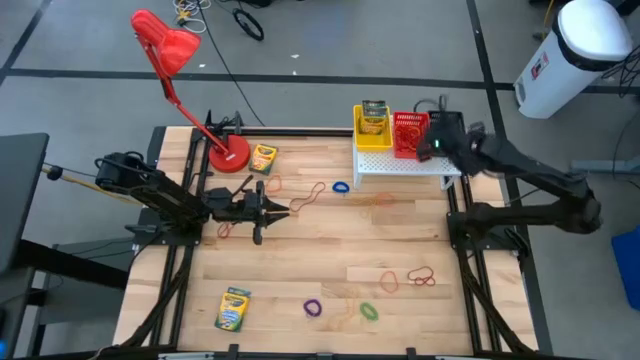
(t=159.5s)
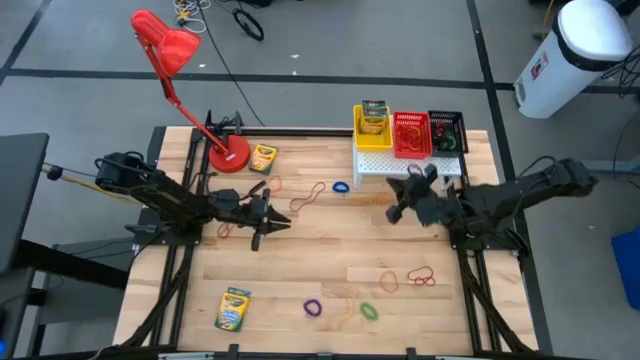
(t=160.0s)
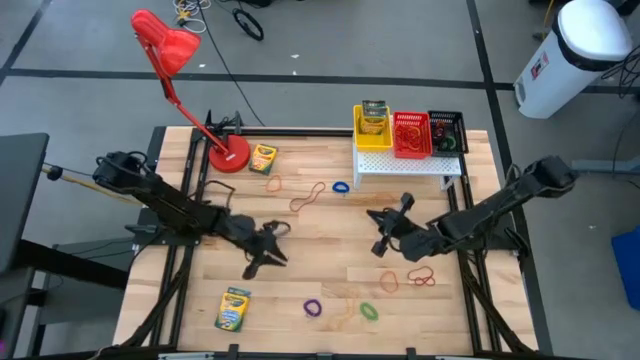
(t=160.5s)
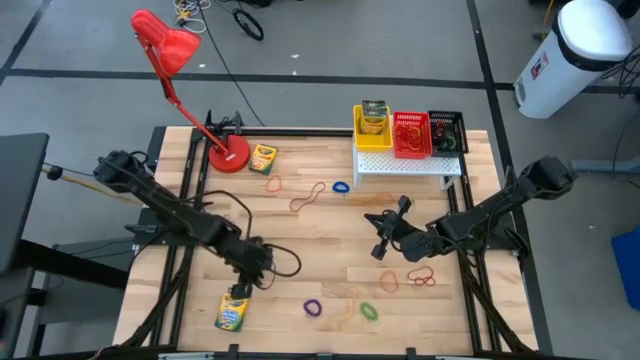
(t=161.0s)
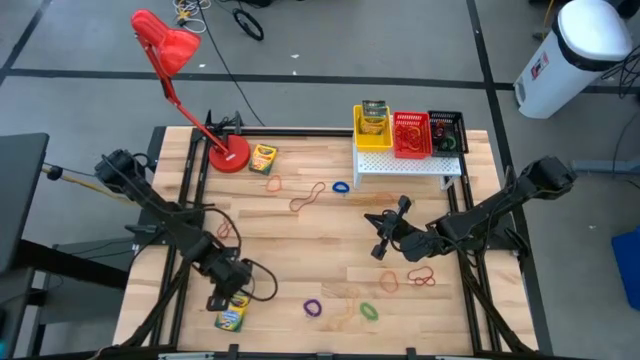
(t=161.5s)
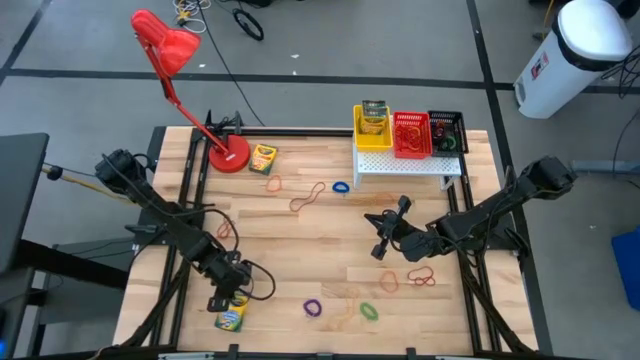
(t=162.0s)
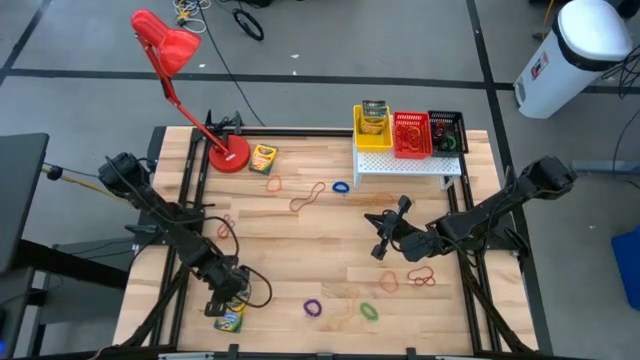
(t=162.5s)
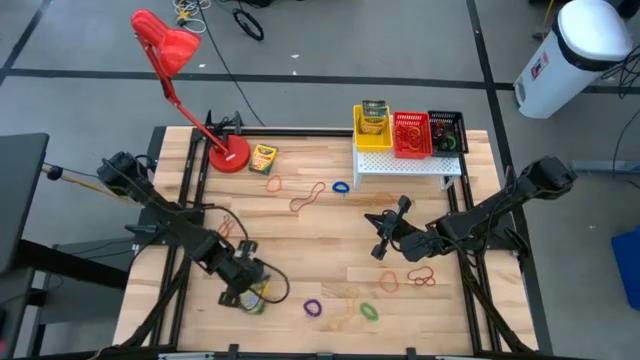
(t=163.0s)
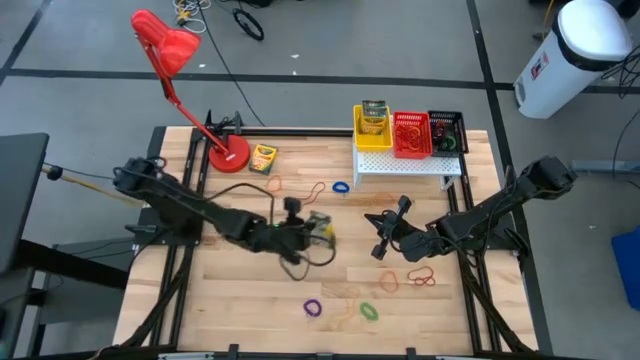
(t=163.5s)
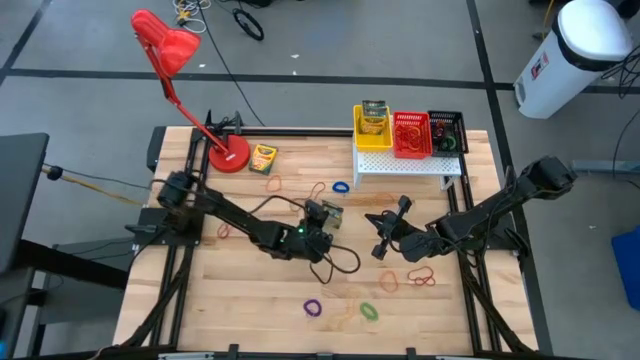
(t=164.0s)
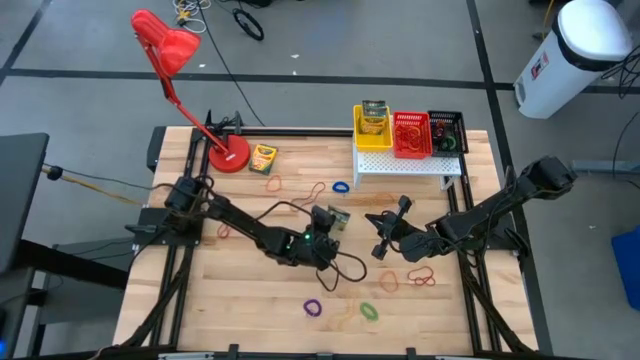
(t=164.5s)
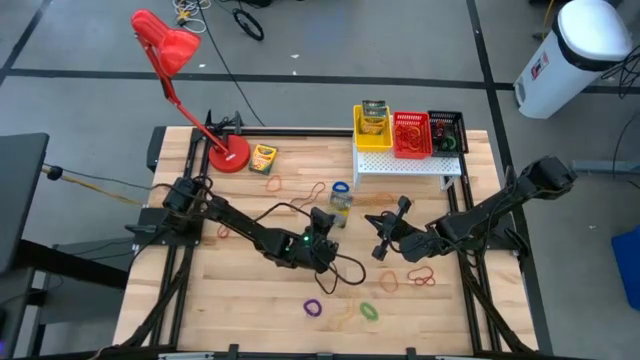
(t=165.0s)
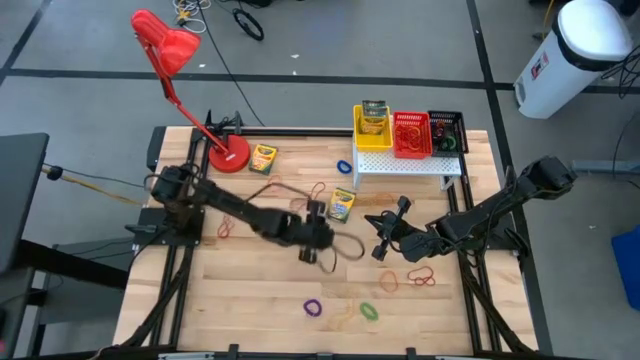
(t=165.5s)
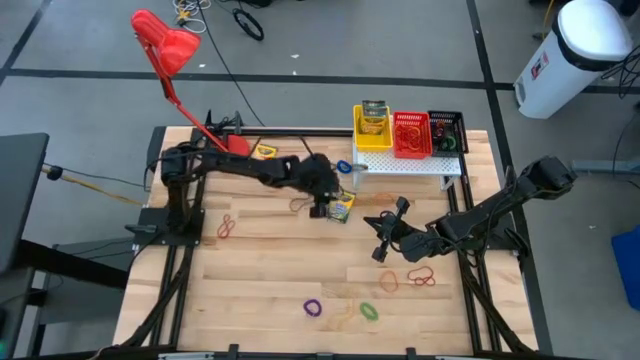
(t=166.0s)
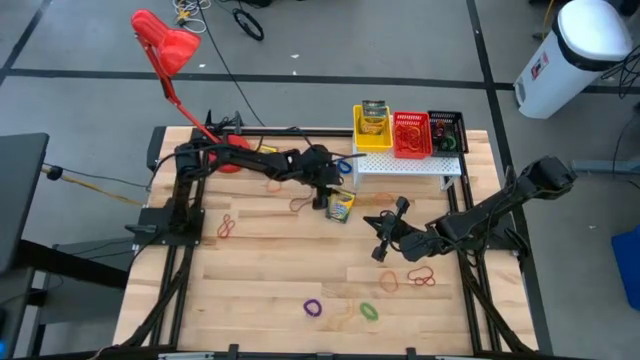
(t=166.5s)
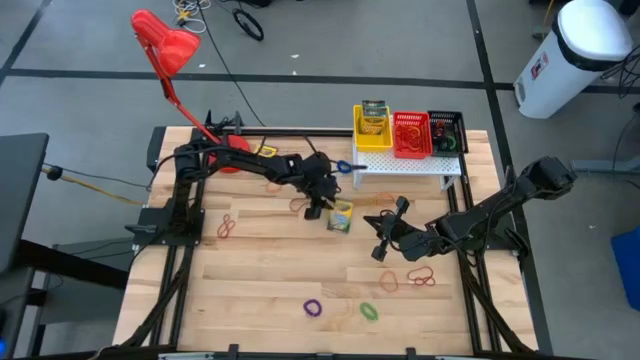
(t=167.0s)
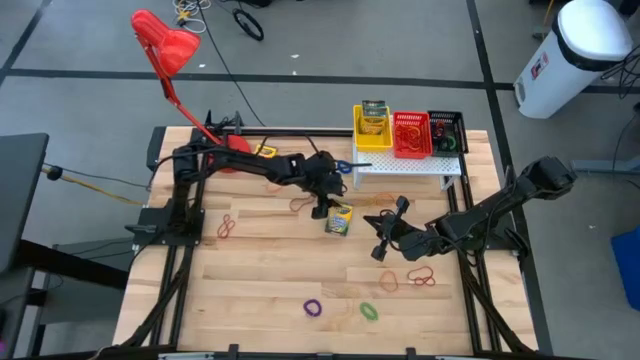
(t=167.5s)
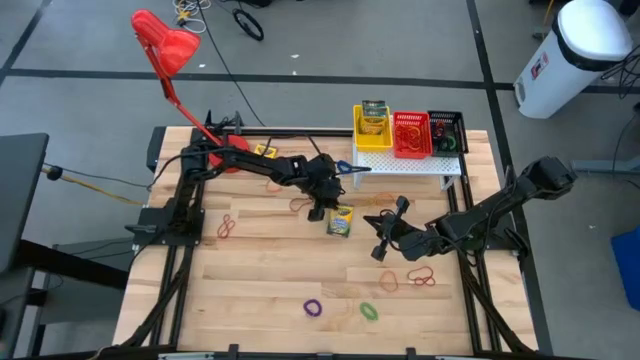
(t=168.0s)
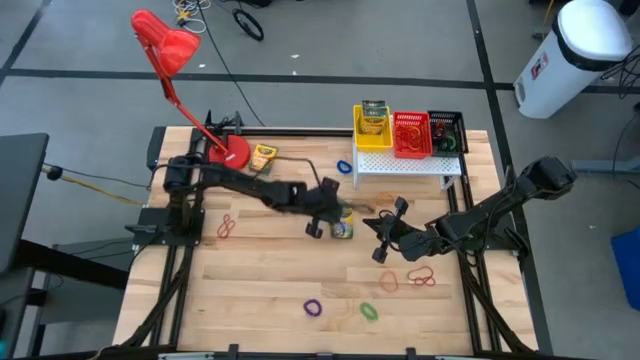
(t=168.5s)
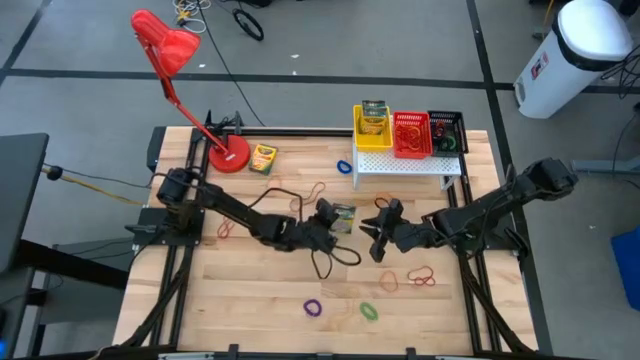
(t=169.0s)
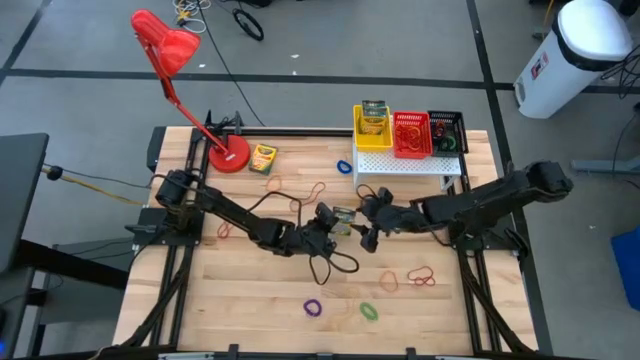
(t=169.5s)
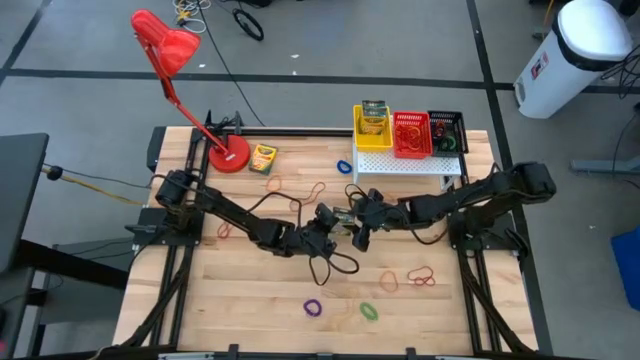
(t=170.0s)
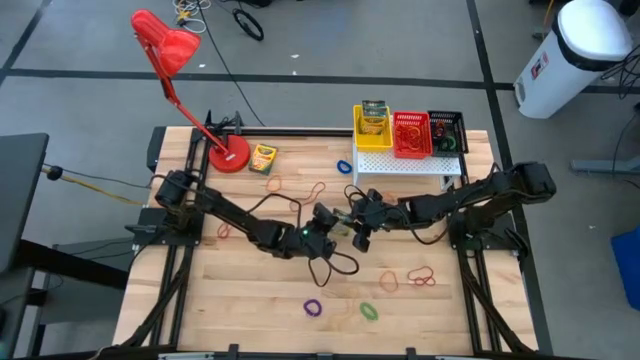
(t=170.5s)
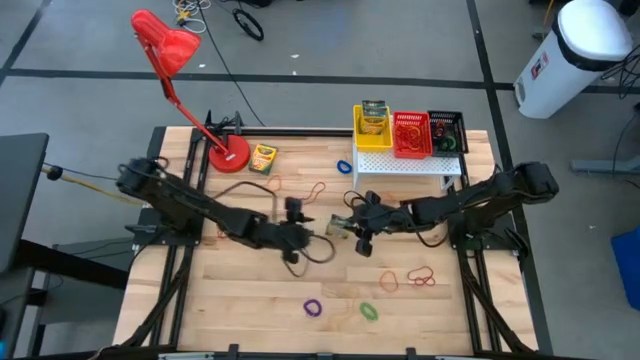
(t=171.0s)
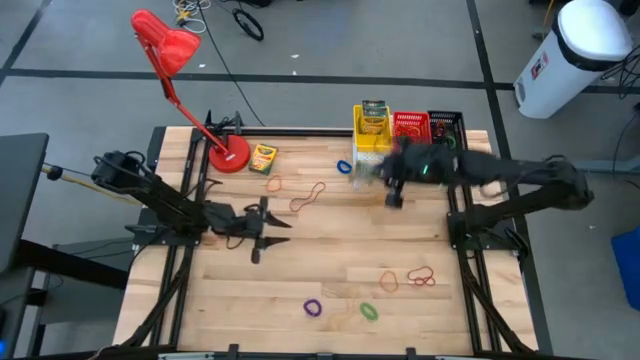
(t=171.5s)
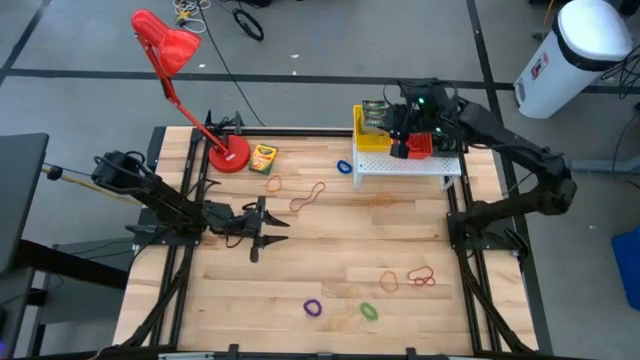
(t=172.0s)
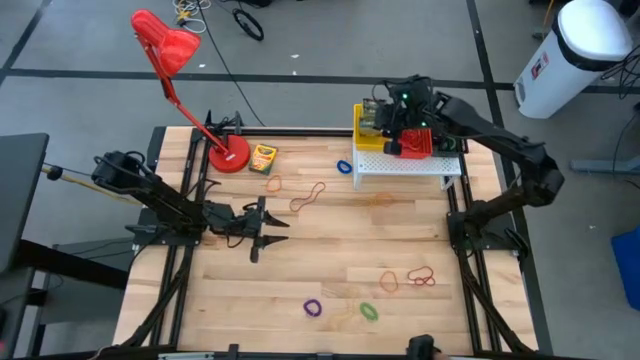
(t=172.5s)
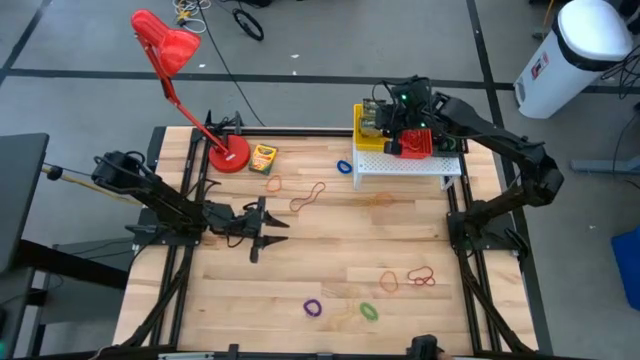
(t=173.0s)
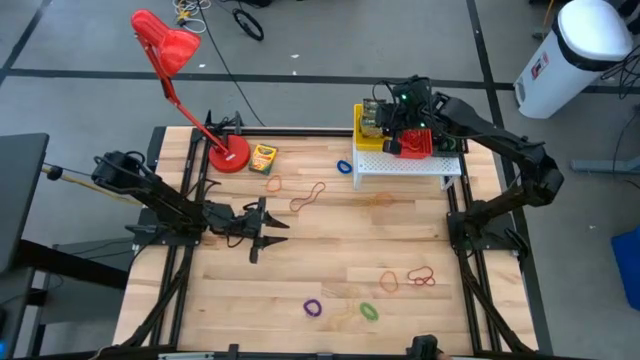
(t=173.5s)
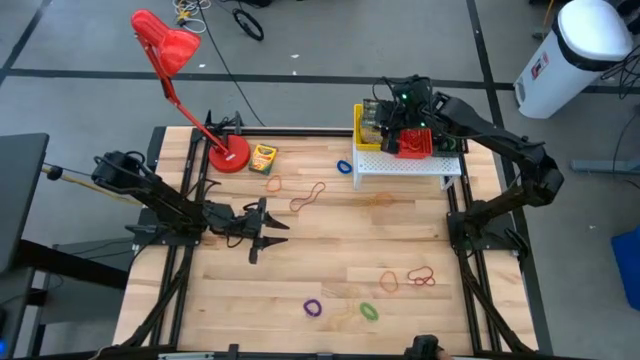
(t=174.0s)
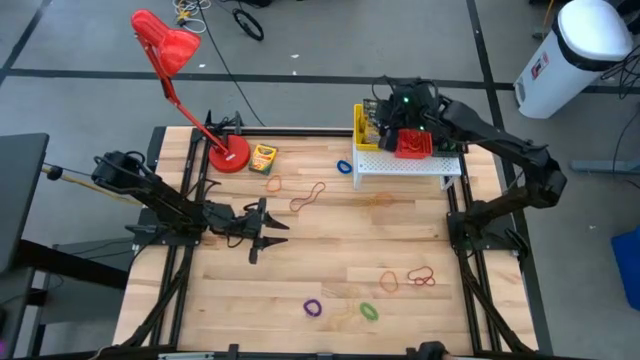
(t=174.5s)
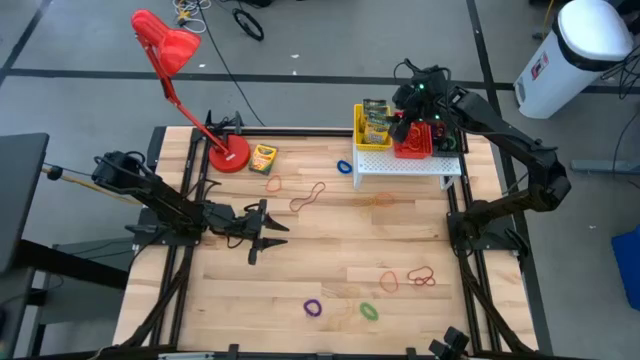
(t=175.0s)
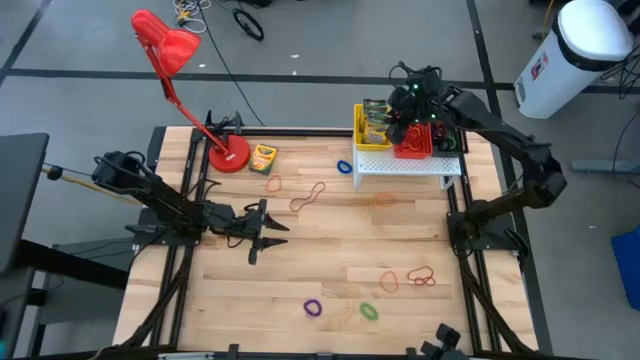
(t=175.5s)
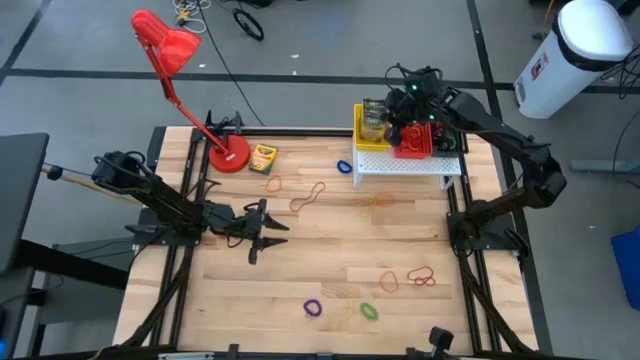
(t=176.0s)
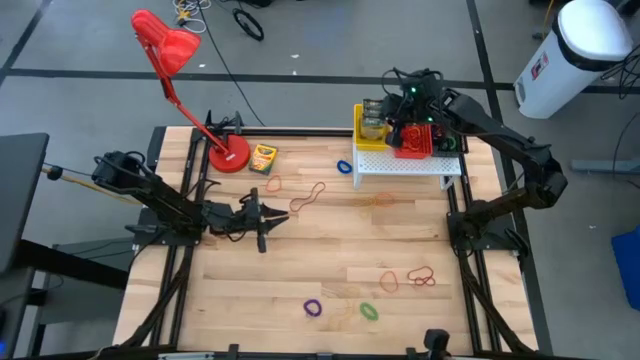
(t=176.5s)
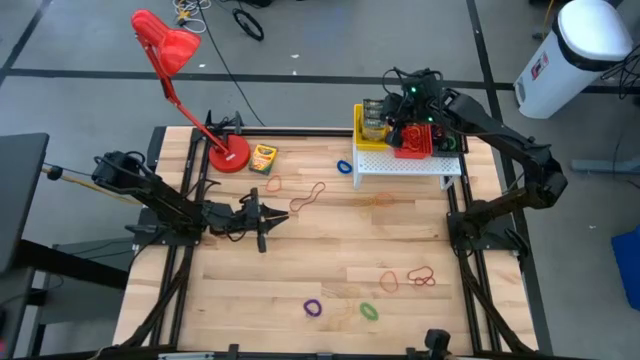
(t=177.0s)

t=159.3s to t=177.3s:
Task: Pick & Place Office Desk Supplies
Put the yellow crayon box on the yellow basket

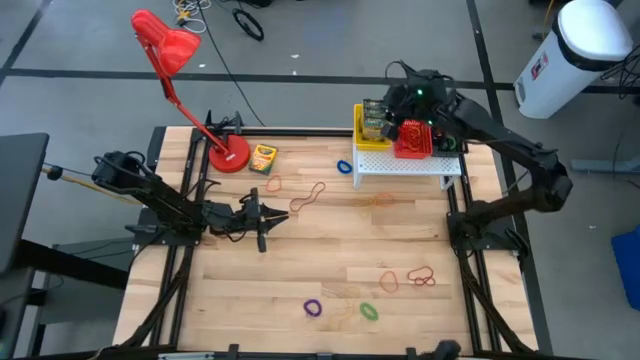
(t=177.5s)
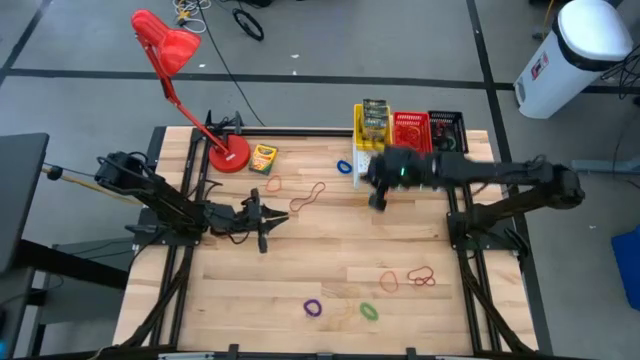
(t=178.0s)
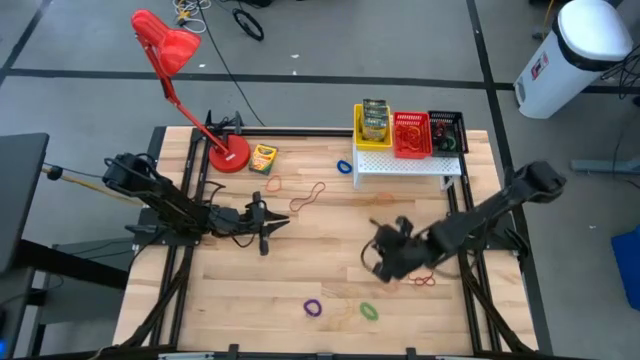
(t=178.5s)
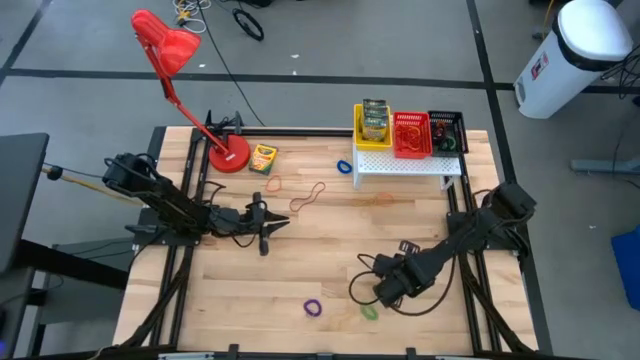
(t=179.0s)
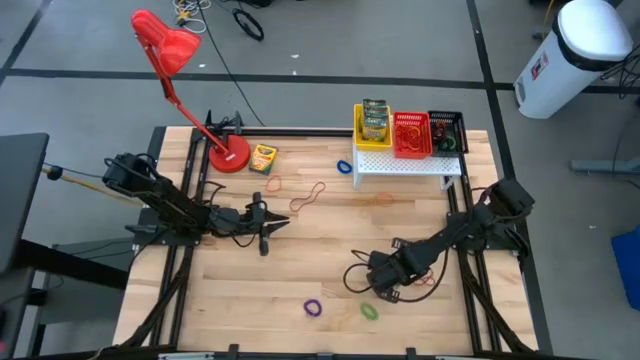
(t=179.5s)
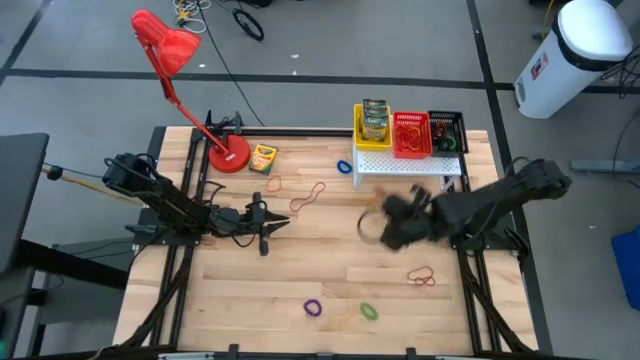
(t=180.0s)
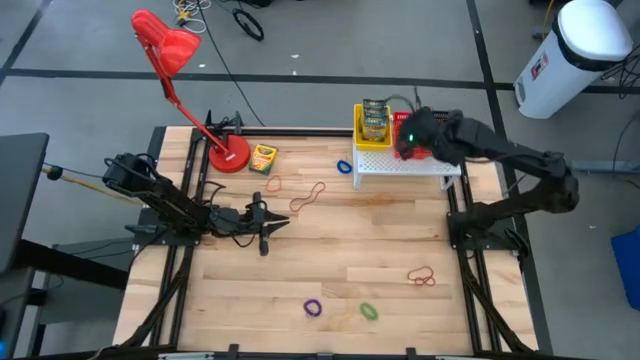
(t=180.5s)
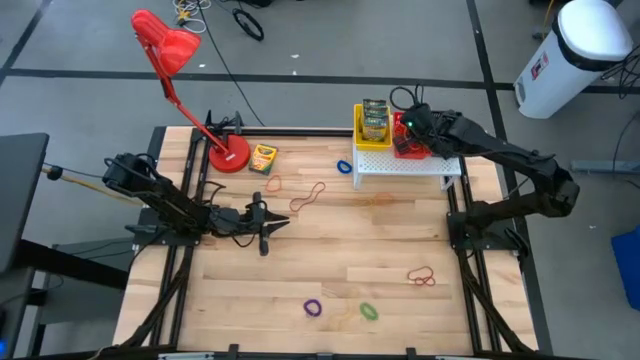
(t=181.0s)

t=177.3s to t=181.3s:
Put the orange rubber band on the orange basket
